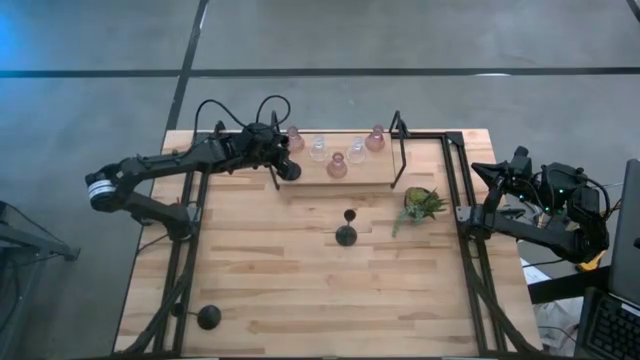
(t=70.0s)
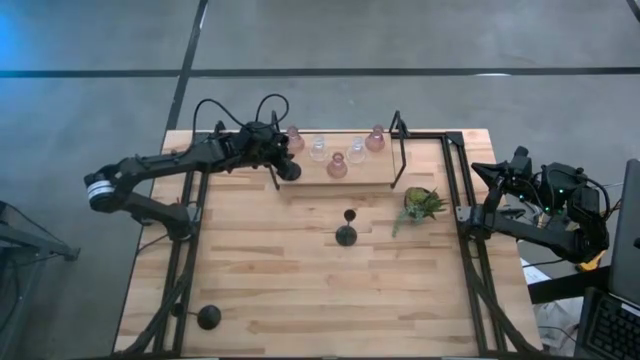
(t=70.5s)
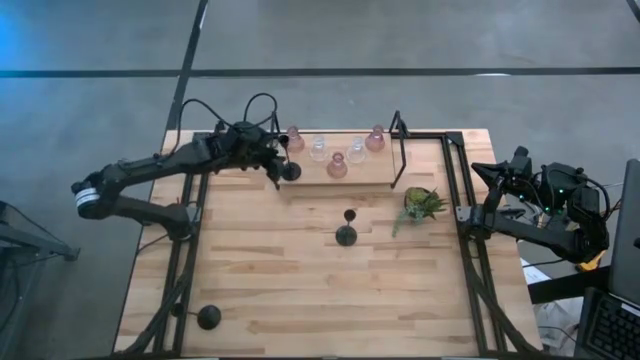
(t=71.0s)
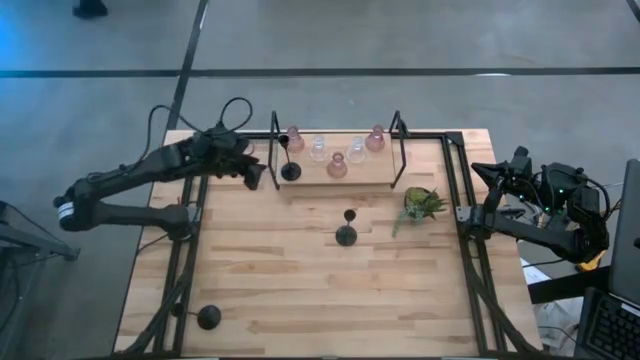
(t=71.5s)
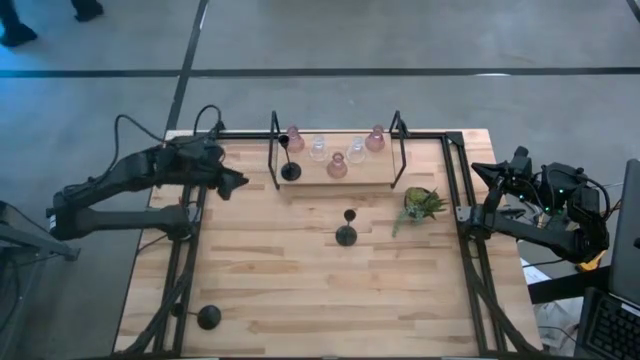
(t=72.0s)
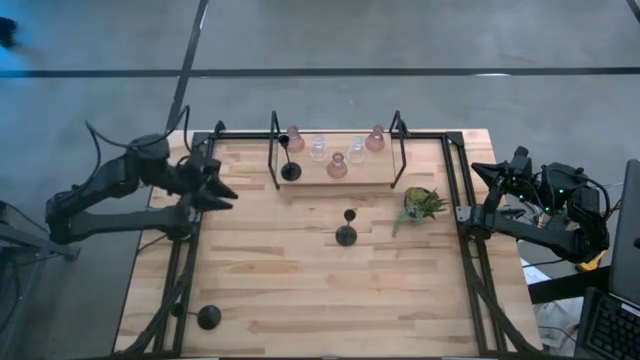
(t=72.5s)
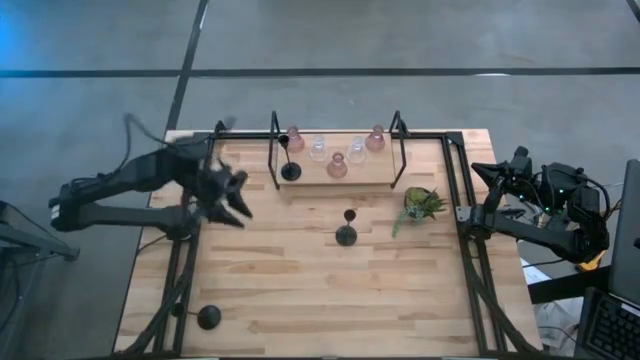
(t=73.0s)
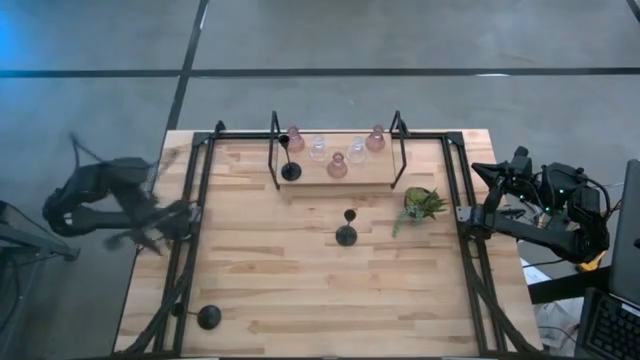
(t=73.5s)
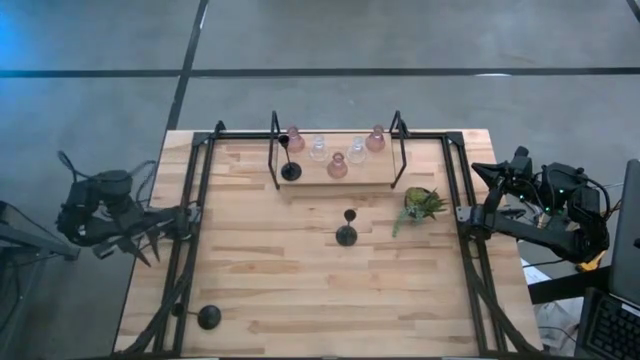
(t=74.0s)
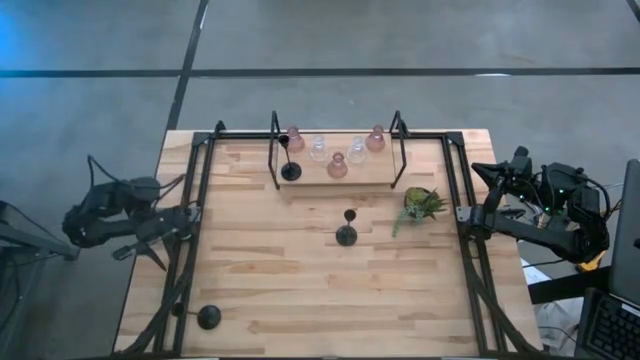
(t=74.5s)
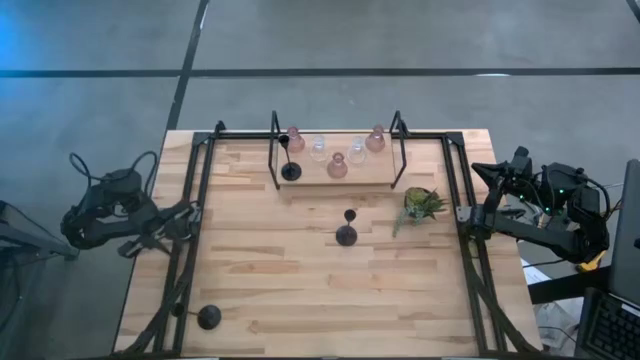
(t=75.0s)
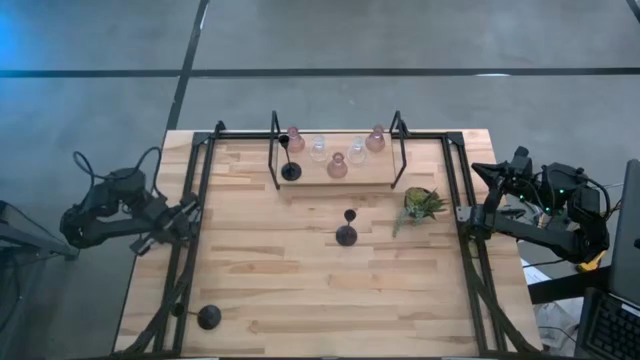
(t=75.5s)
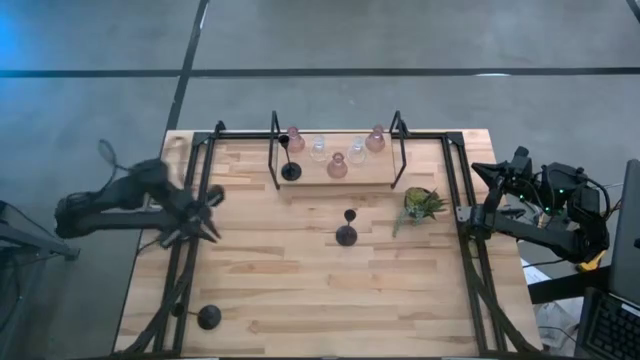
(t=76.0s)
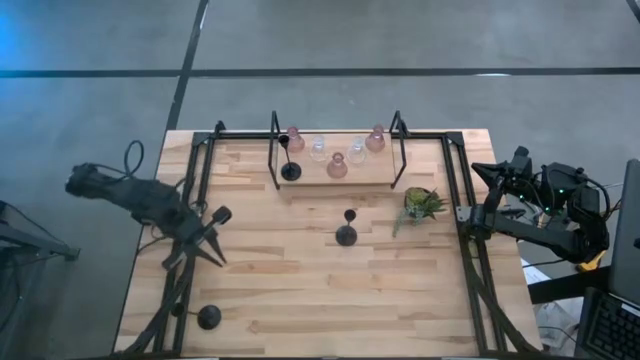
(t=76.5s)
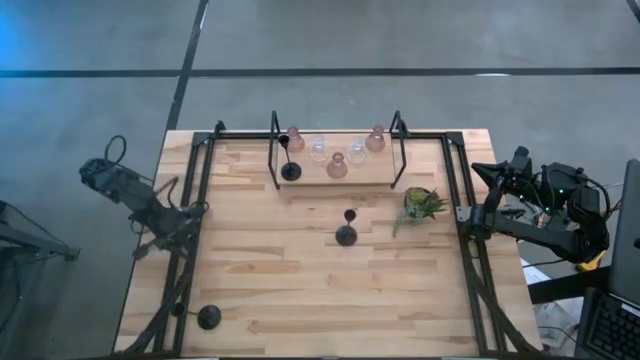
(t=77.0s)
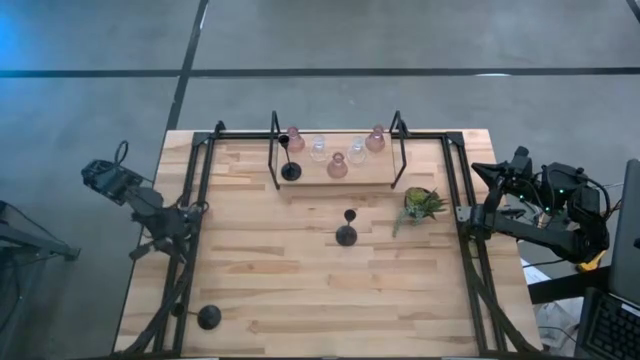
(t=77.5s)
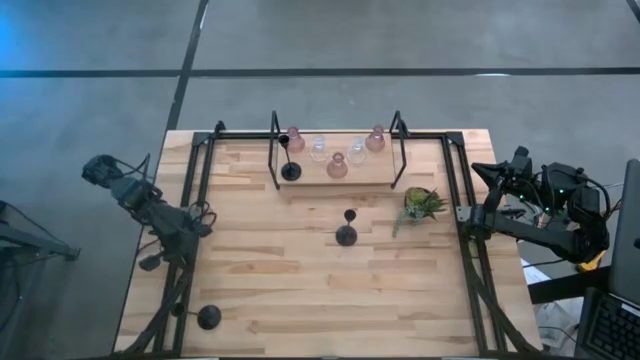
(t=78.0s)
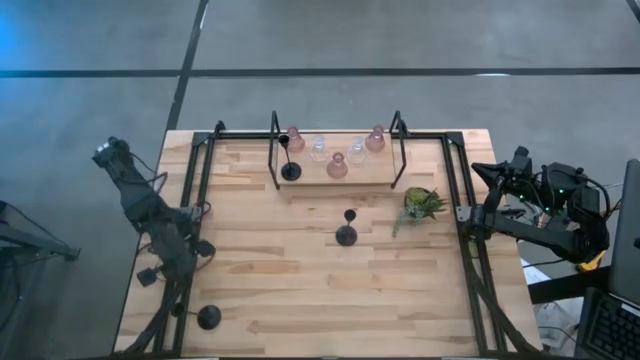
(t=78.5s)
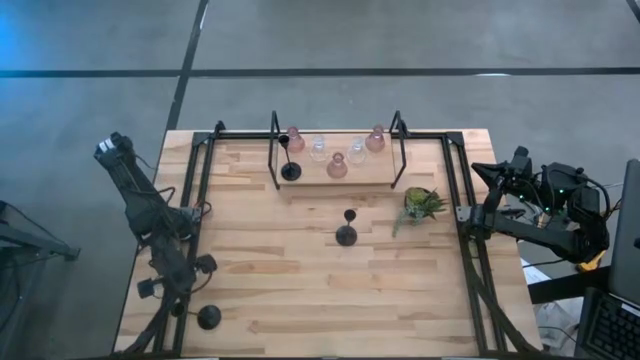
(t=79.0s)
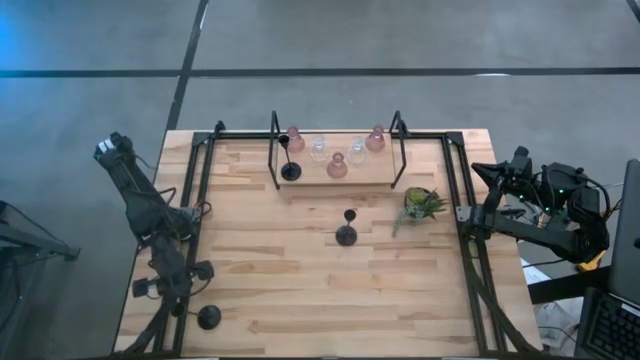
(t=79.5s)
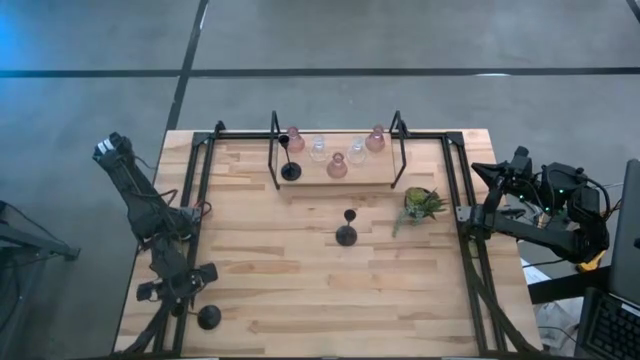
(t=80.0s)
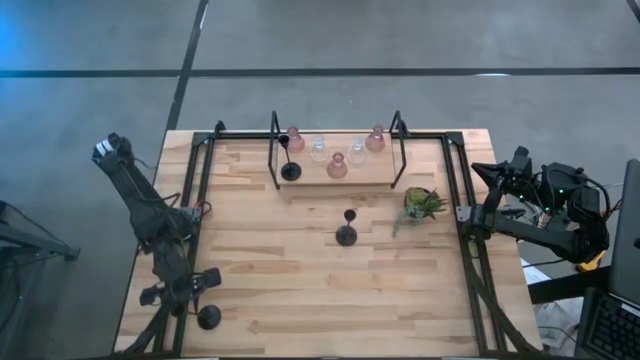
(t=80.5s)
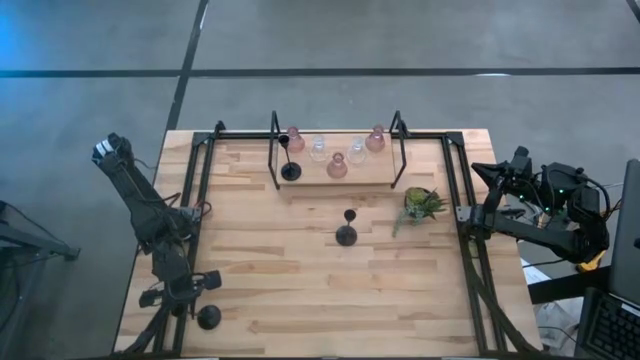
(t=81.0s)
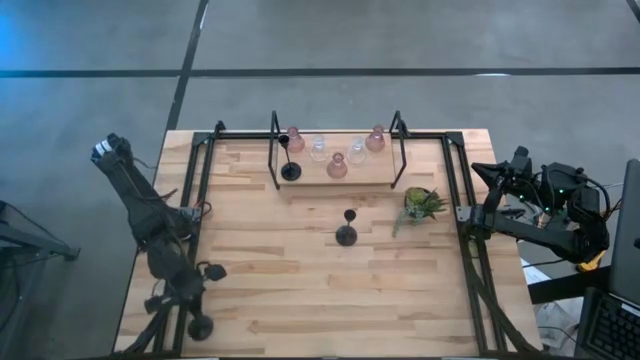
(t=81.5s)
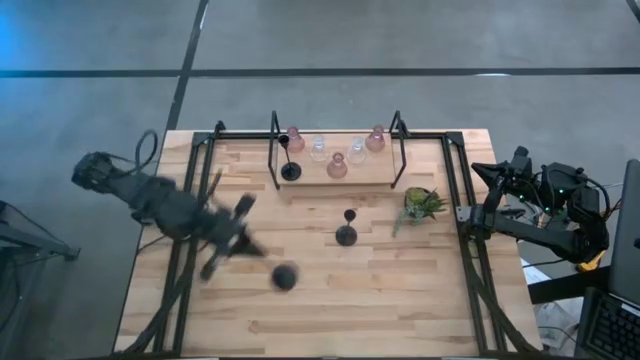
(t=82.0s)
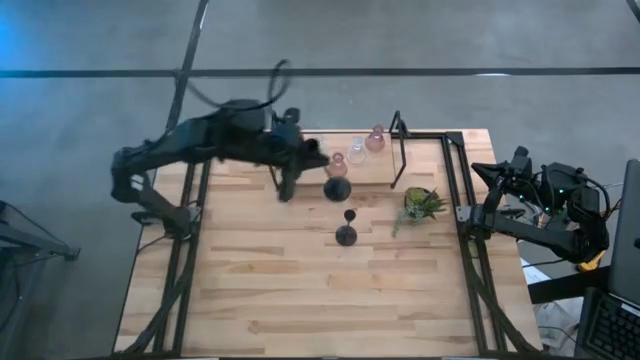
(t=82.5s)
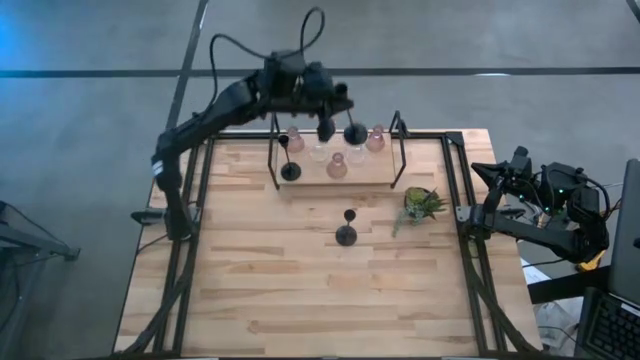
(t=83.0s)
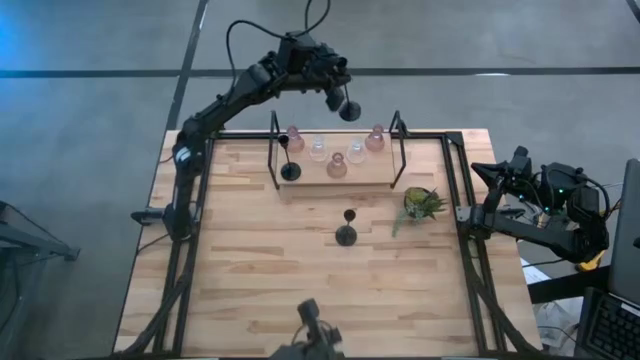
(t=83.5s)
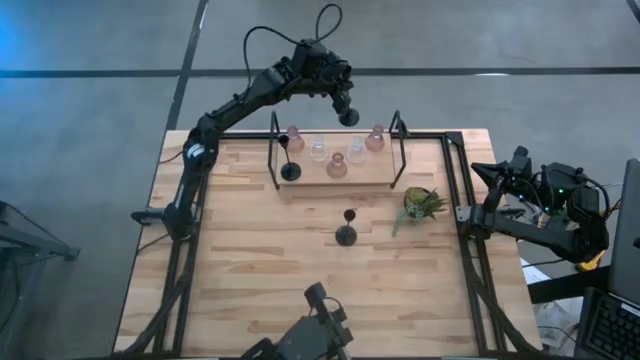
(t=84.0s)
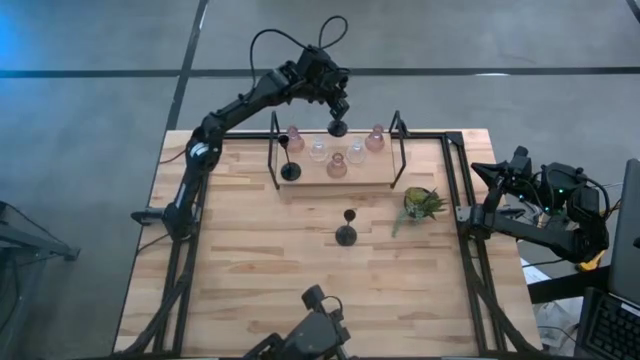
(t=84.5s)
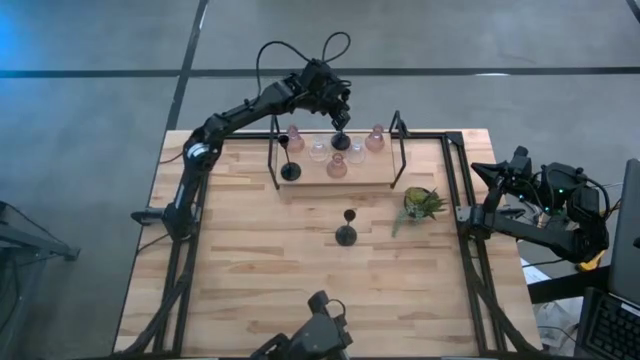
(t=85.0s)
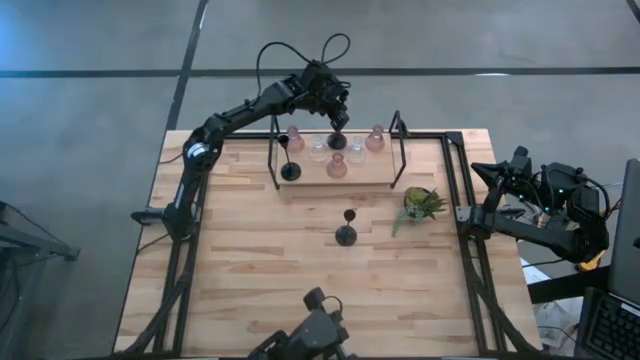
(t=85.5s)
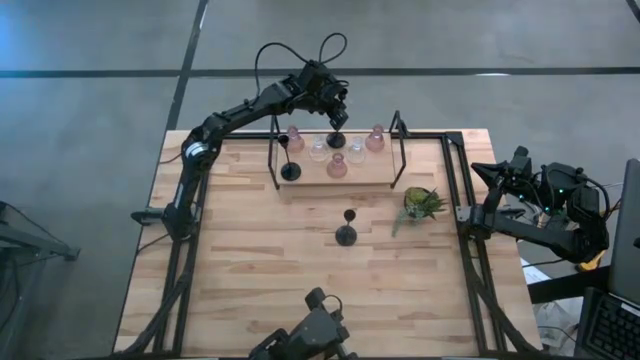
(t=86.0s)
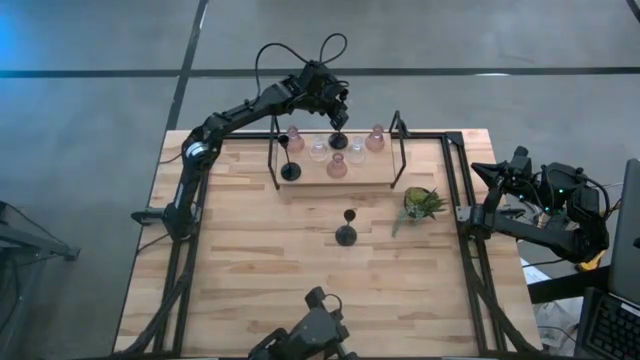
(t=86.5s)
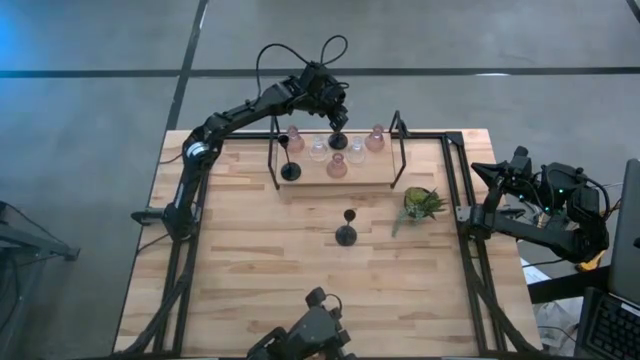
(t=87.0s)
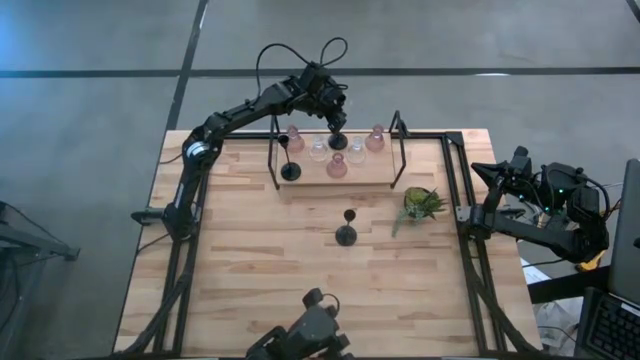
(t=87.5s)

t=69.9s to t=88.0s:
Task: Pick & Place candle stick holders
Put the bottom black candle holder on the shelf

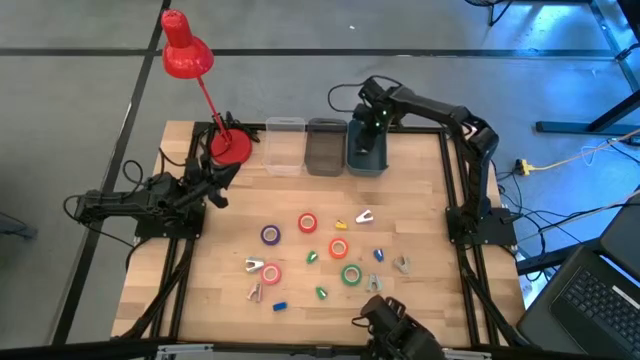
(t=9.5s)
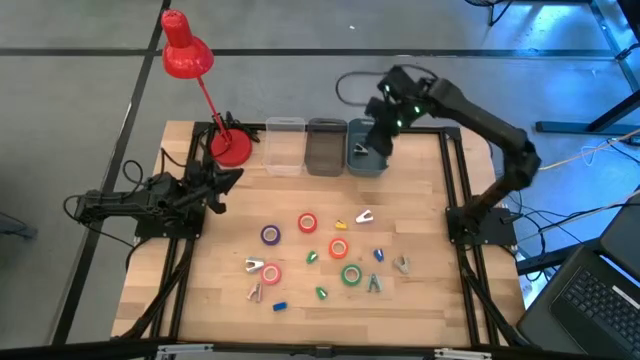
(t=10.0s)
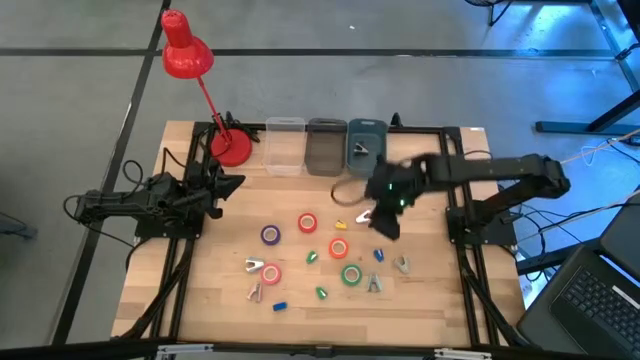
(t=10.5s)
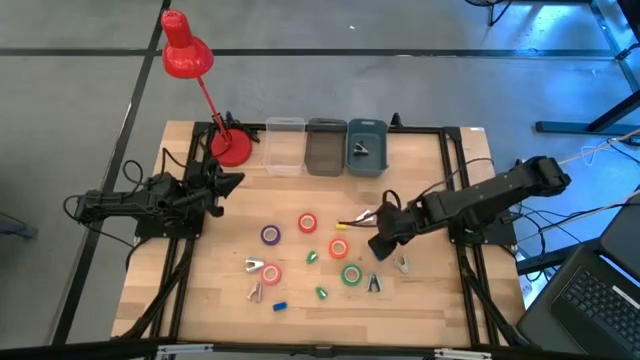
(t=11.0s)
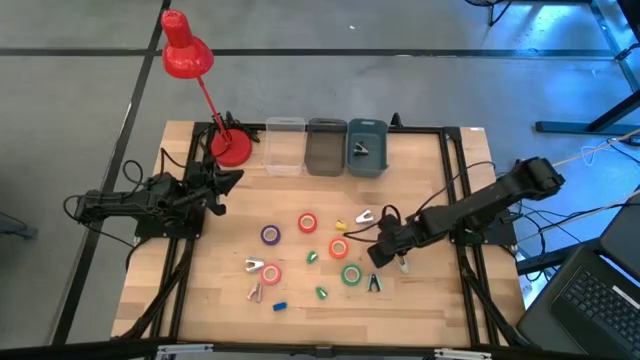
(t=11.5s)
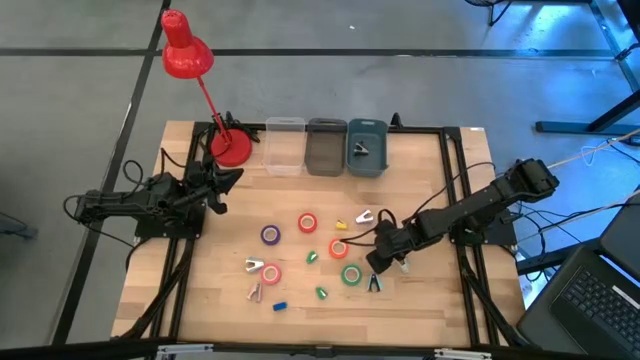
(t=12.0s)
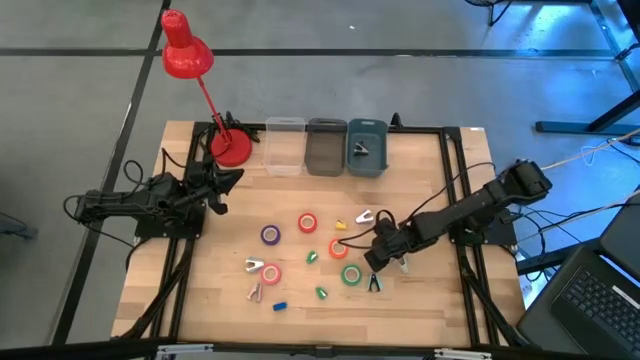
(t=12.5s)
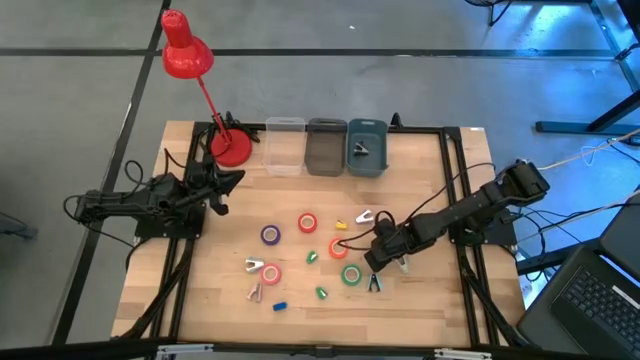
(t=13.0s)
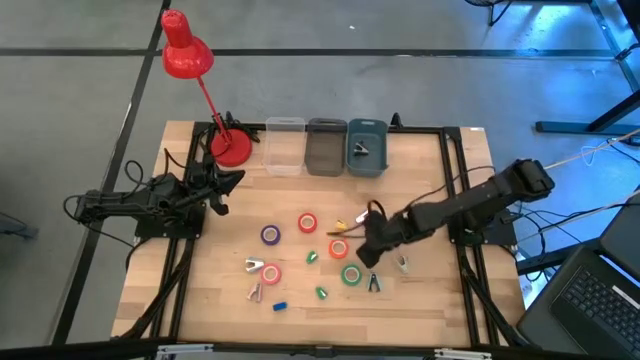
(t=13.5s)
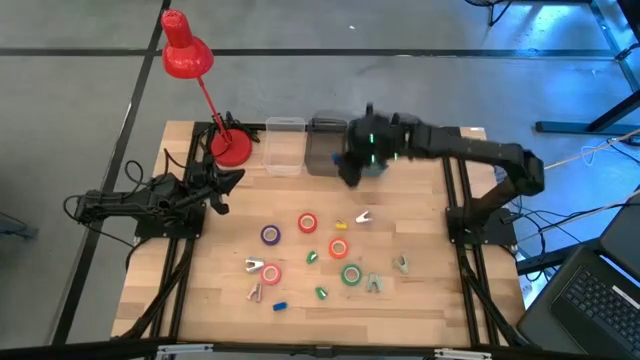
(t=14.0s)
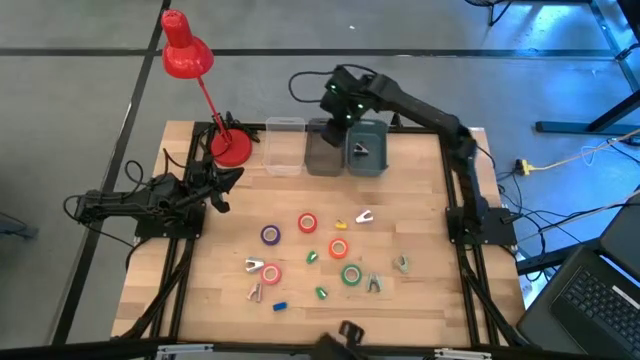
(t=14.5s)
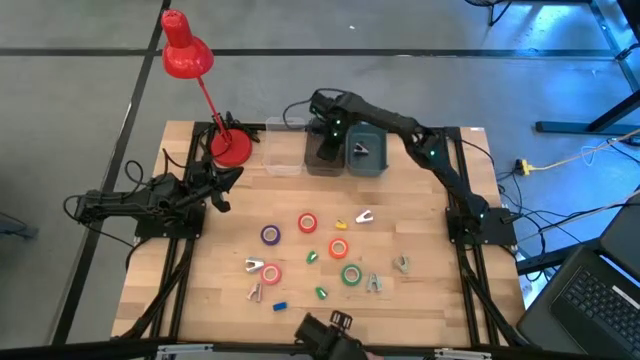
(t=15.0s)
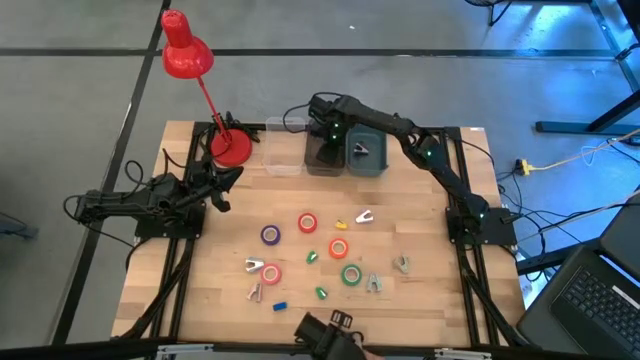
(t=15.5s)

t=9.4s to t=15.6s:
Task: Pick and place Stapler, Stapler remover, tape
Put the right blue stapler into the black bin
